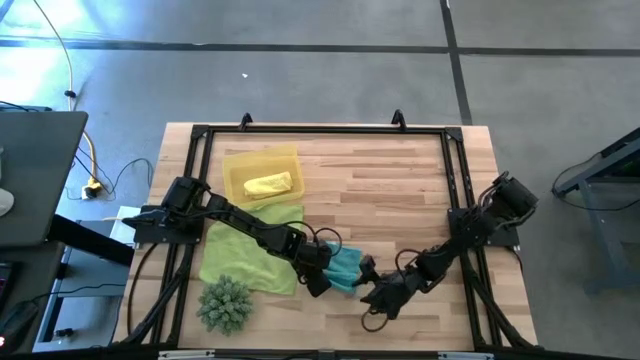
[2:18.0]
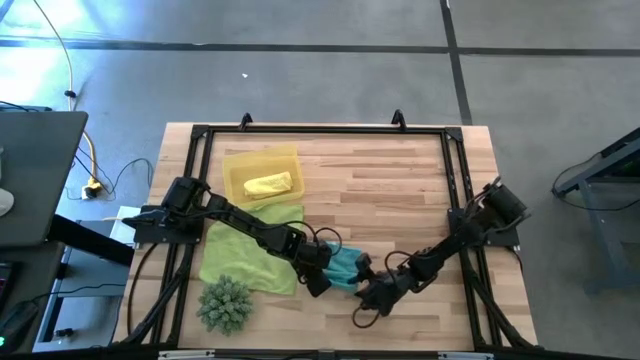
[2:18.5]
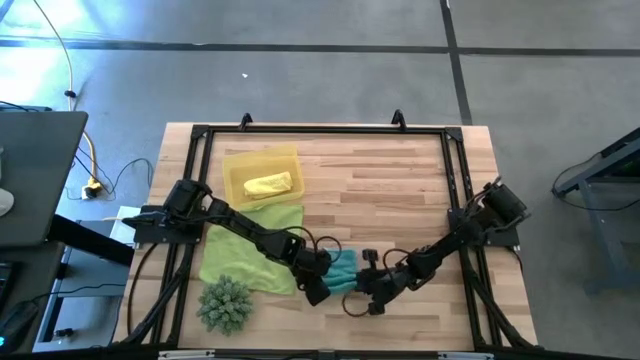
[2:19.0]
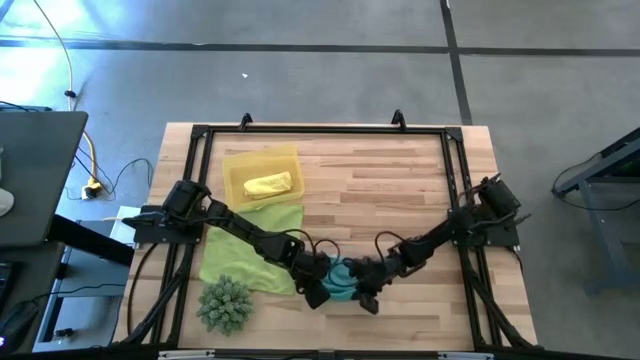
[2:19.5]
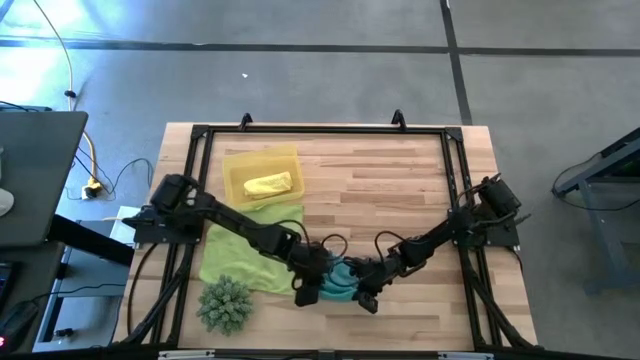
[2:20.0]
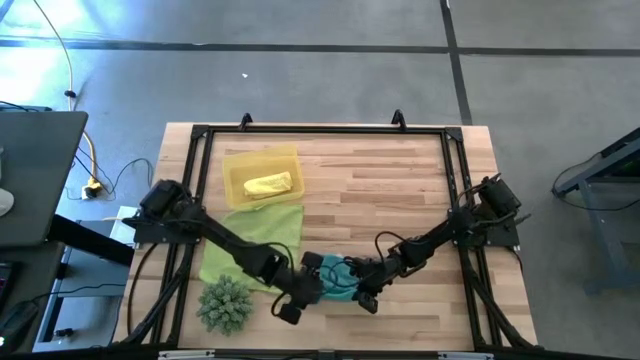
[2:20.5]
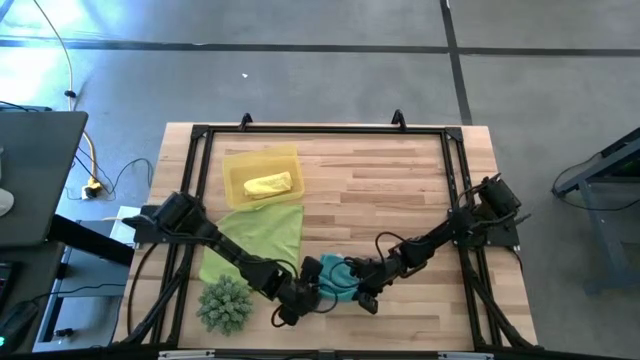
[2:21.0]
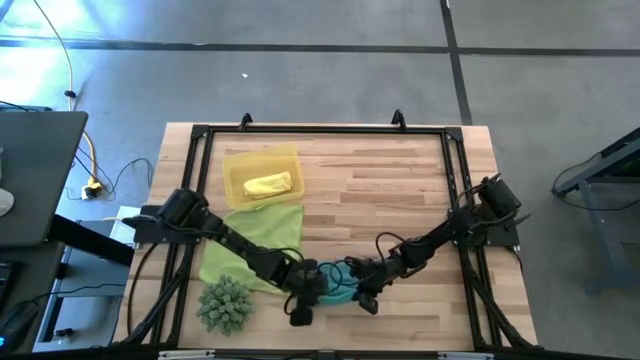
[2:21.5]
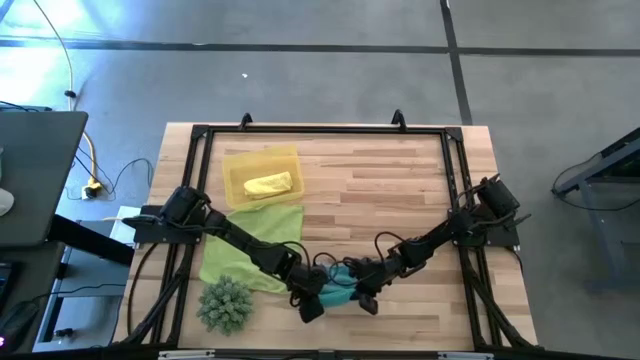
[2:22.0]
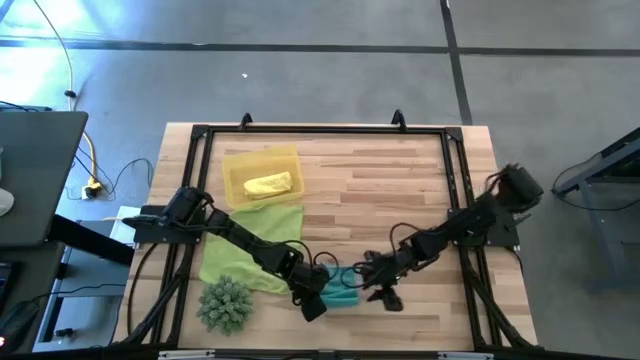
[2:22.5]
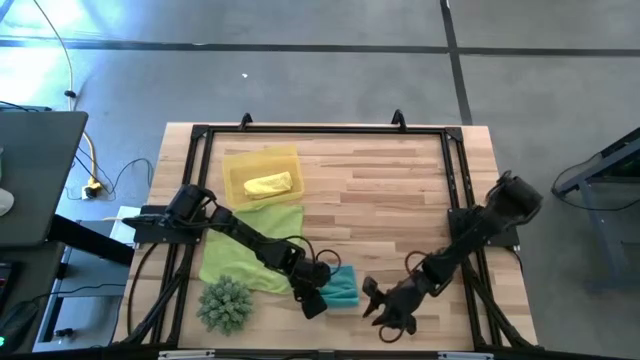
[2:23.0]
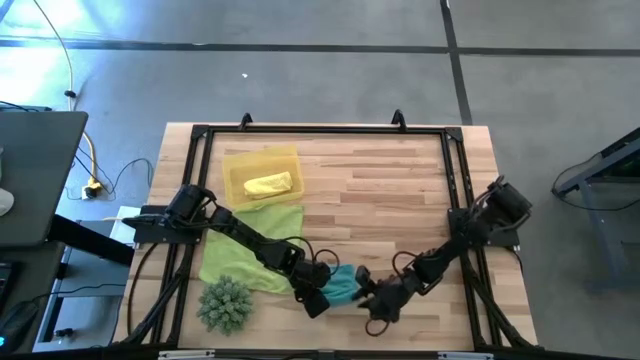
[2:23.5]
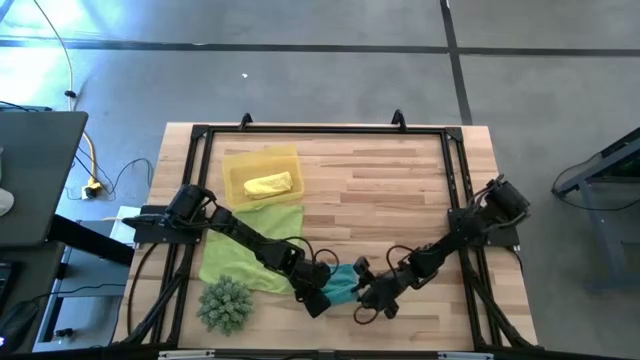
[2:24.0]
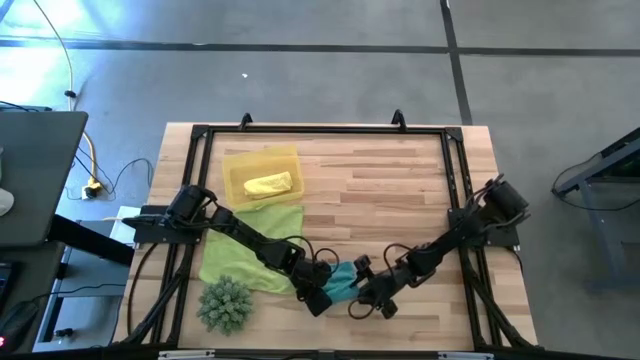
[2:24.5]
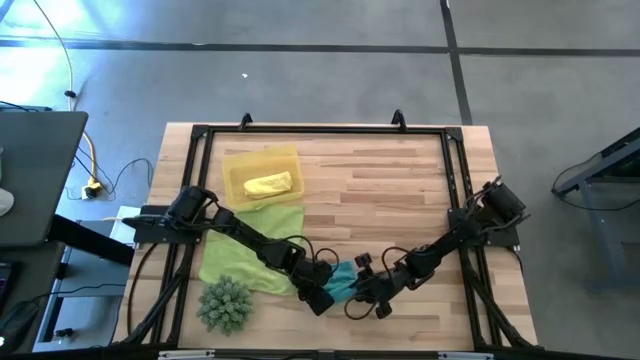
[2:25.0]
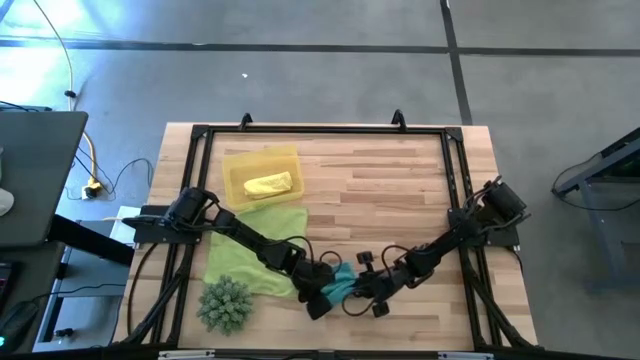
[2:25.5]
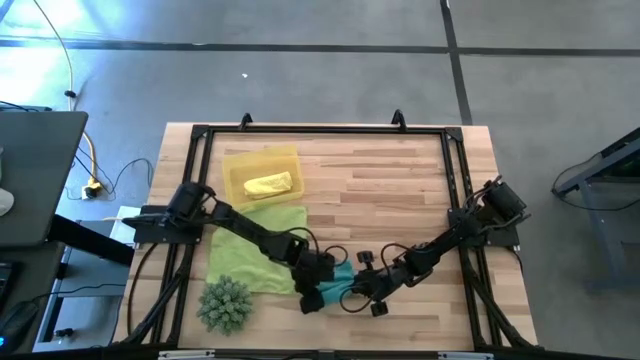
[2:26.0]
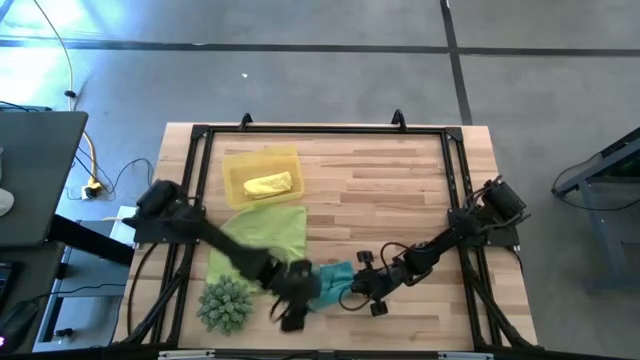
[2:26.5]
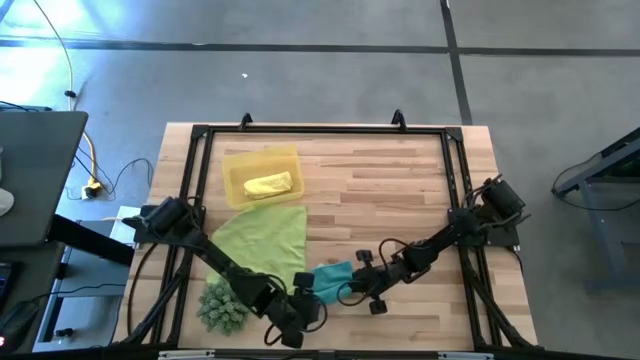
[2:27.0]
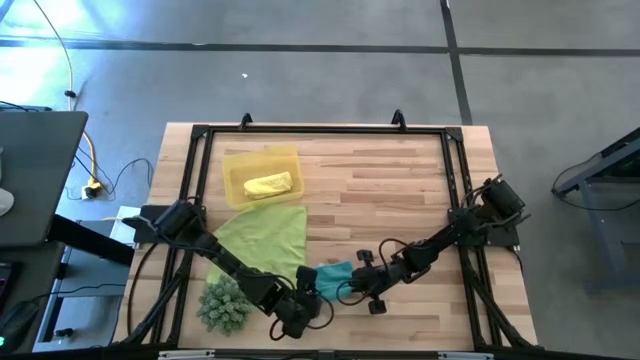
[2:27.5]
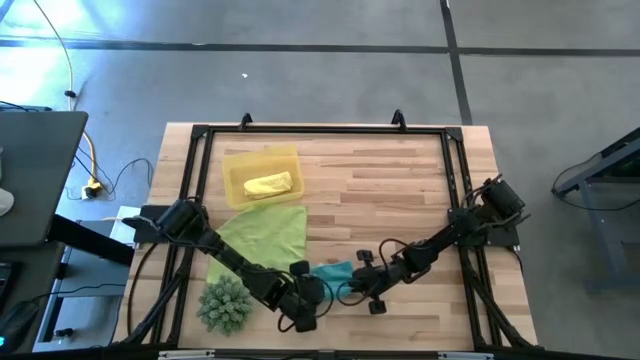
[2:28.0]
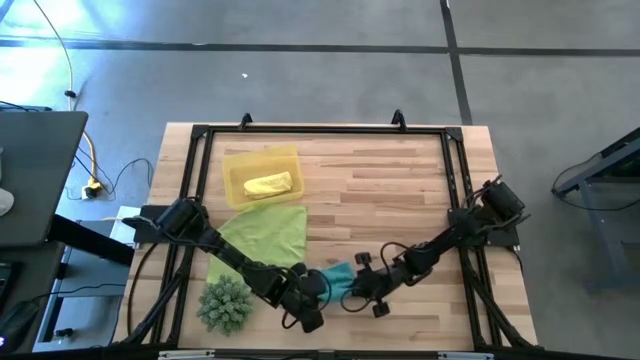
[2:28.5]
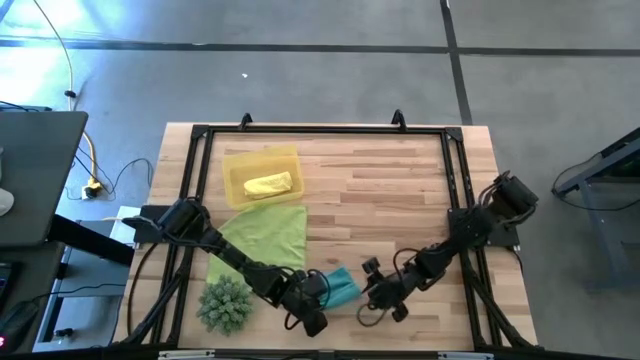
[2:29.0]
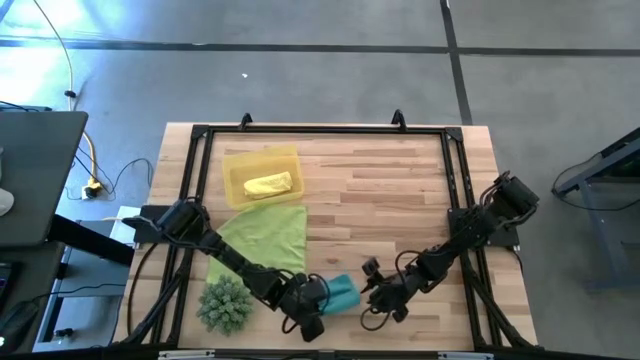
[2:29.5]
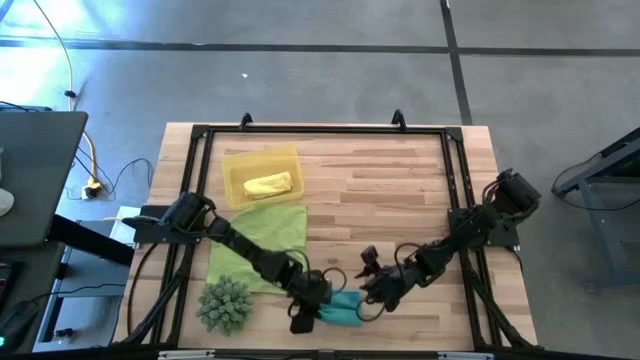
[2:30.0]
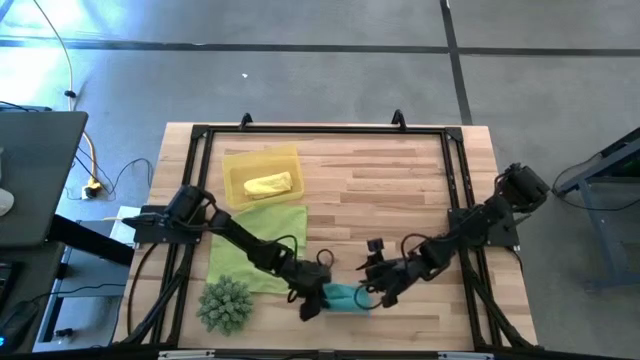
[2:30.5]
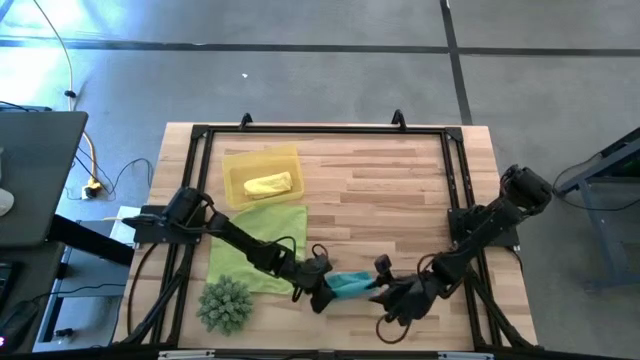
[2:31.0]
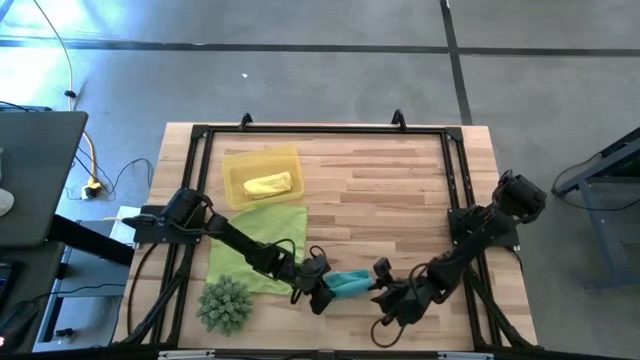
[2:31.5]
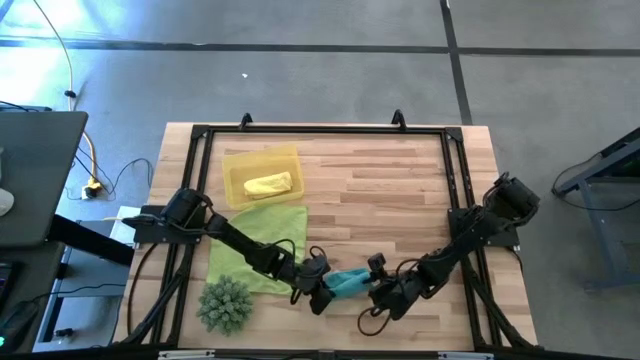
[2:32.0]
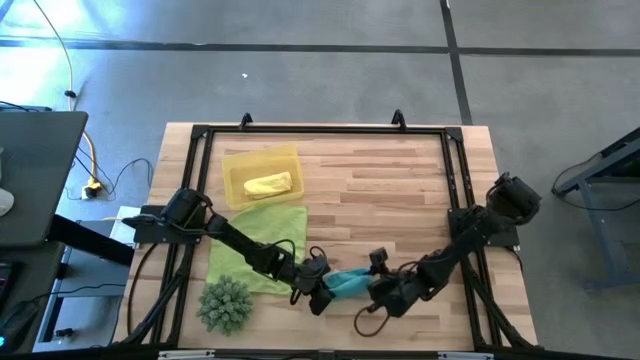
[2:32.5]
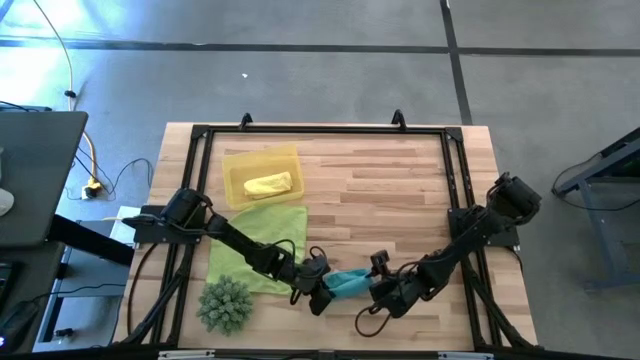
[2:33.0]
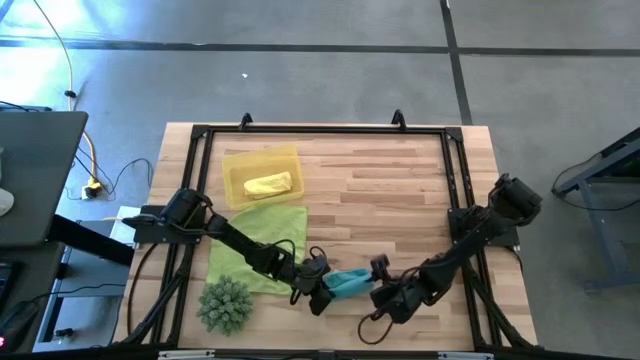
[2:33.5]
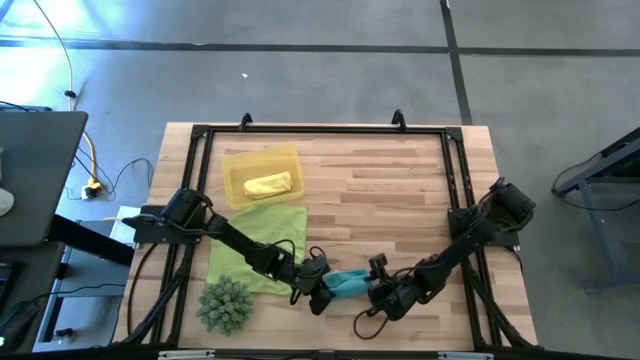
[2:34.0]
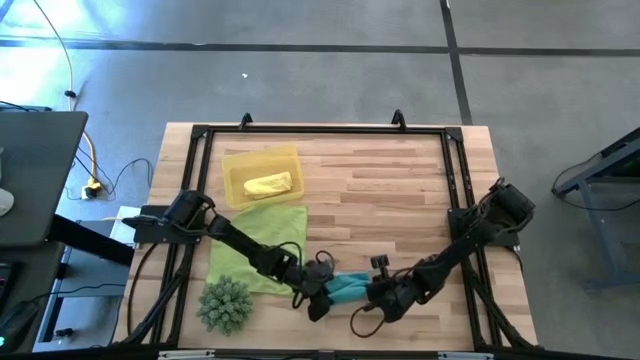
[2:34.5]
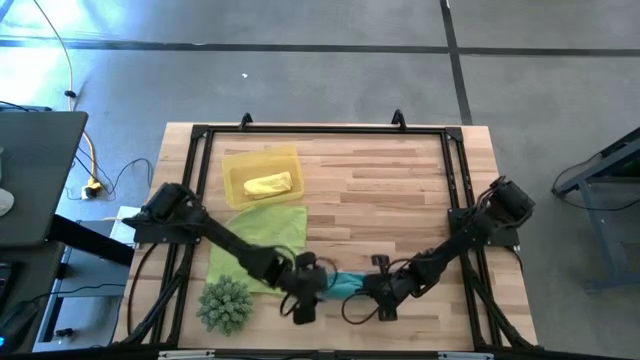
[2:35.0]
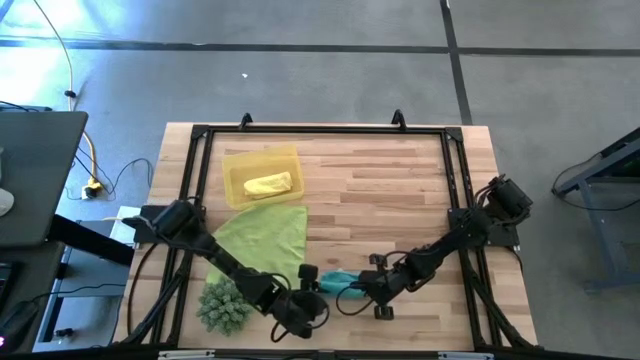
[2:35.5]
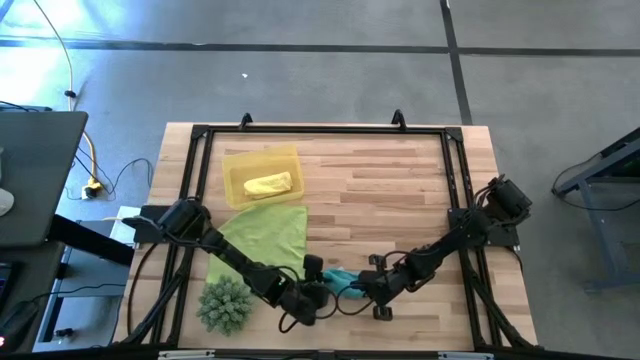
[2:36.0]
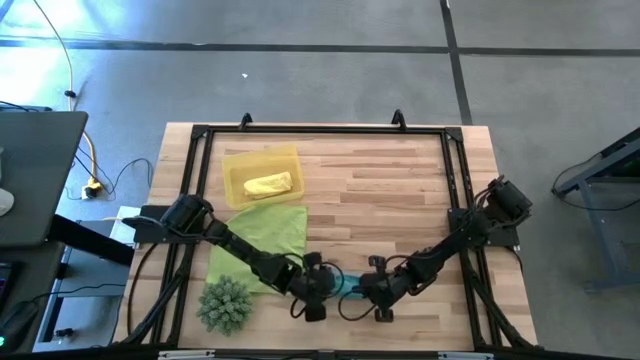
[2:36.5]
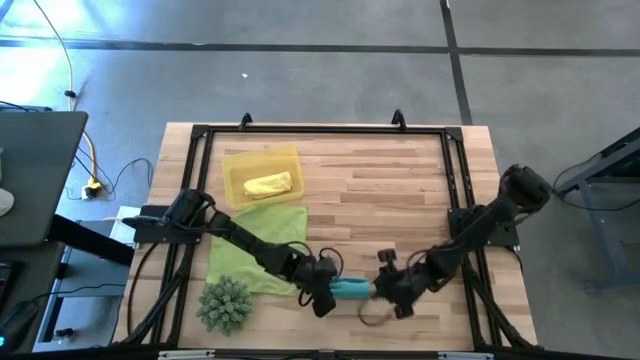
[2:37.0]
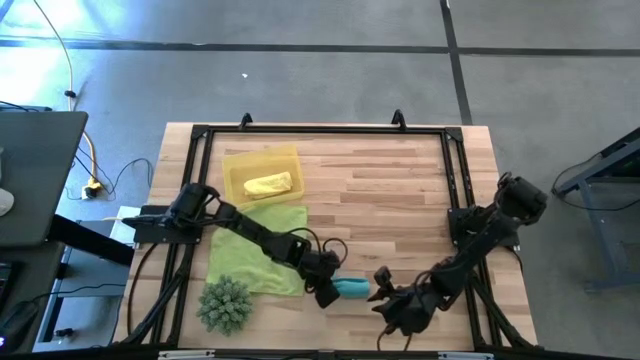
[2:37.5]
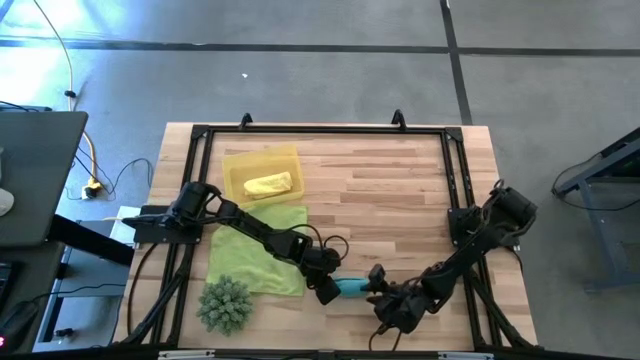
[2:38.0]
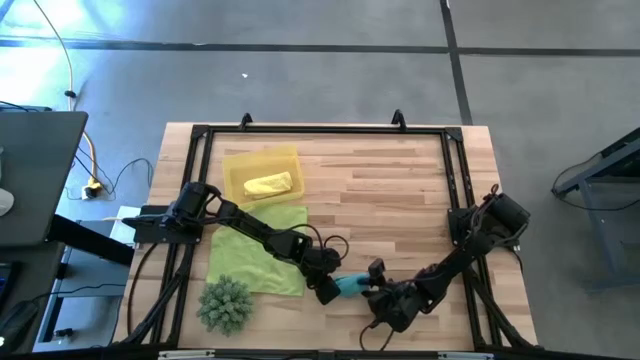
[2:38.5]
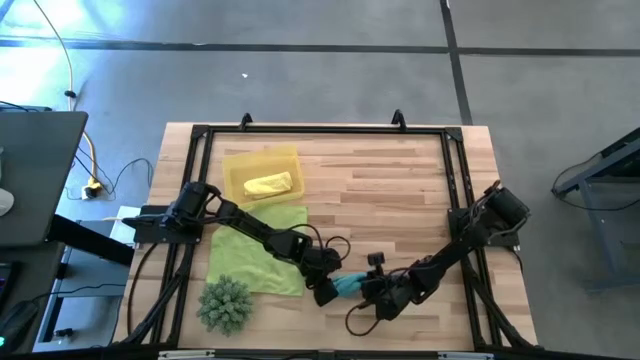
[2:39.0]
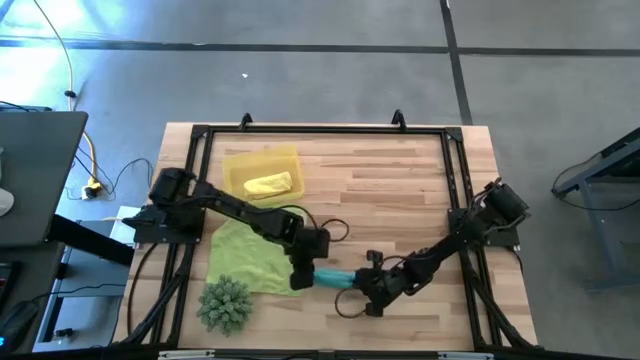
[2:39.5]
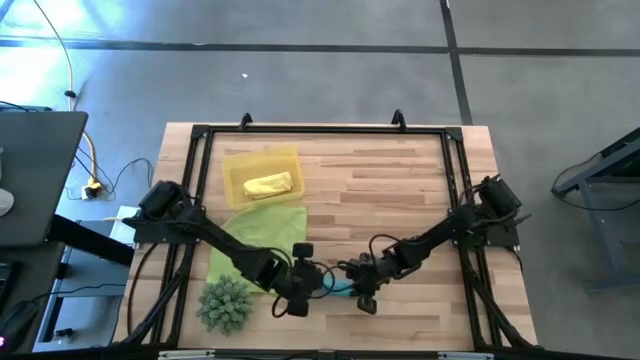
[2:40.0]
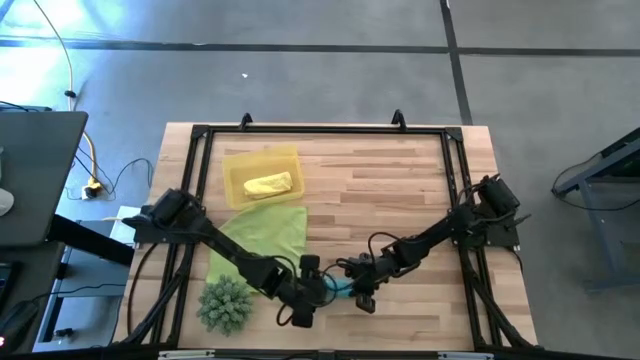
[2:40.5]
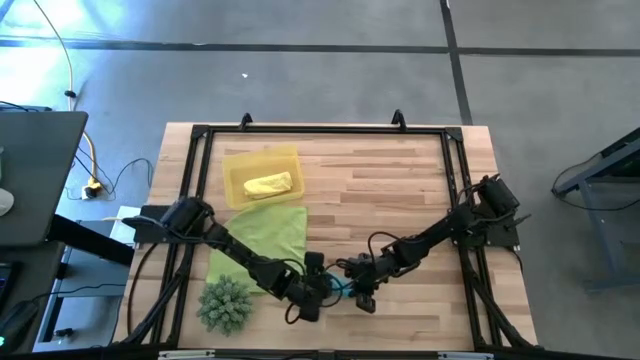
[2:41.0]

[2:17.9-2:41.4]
Task: Roll microfiber towels into tight, uniform cylinder then place into a basket
Roll the blue microfiber towel
